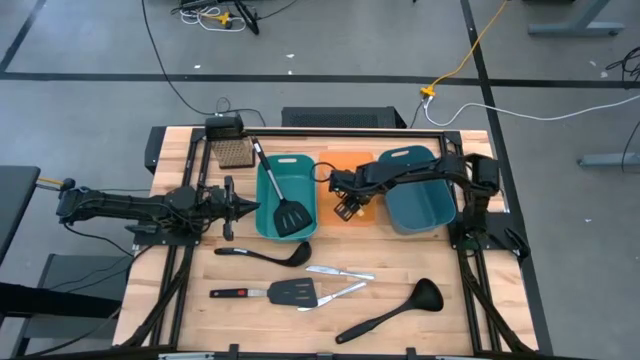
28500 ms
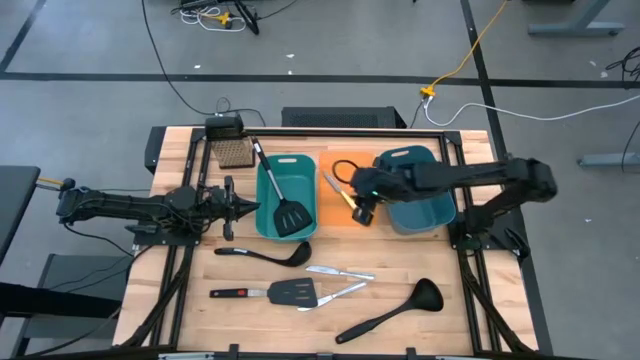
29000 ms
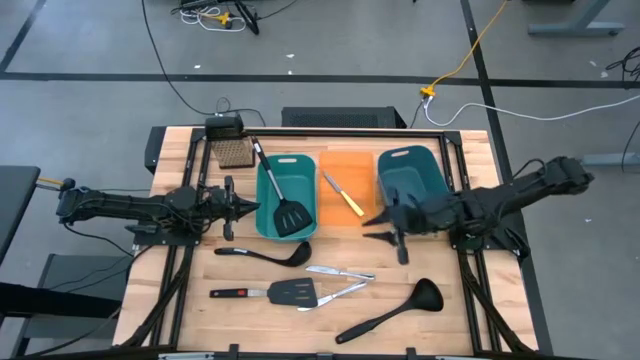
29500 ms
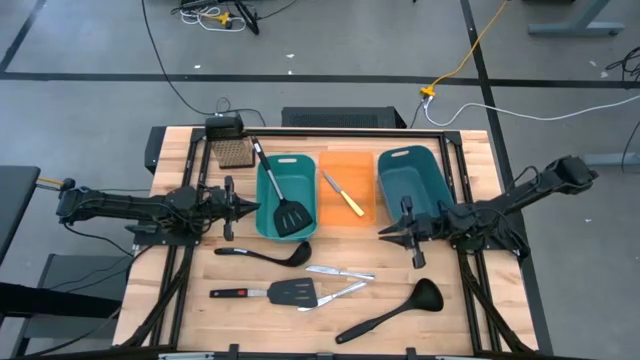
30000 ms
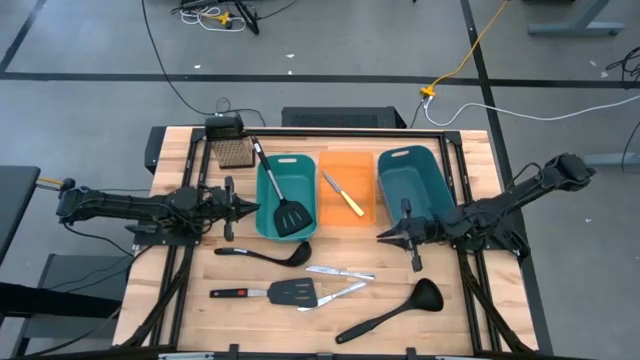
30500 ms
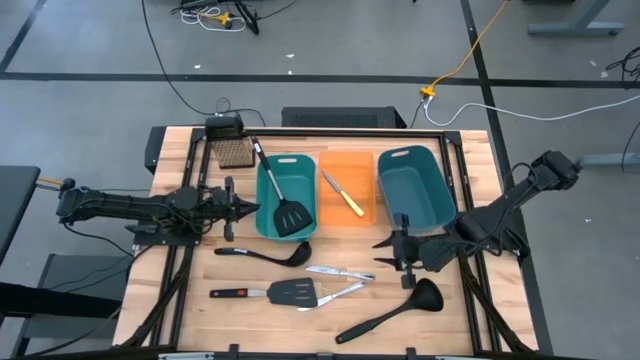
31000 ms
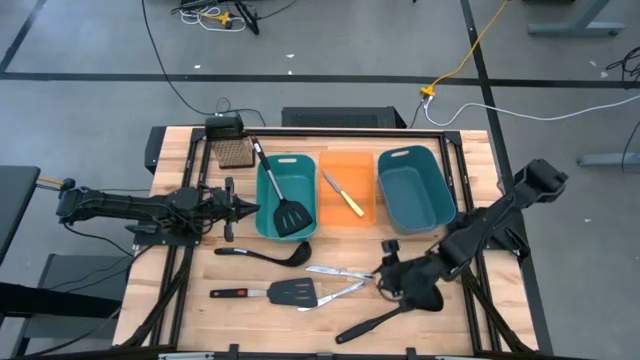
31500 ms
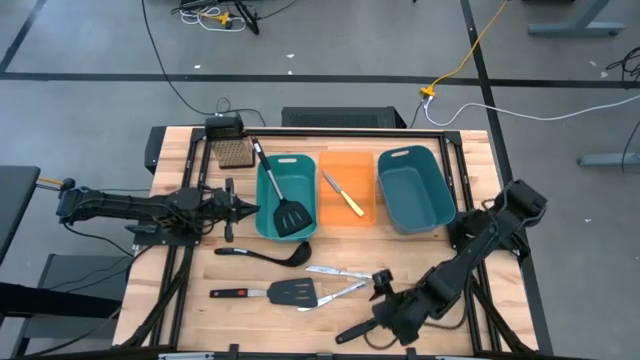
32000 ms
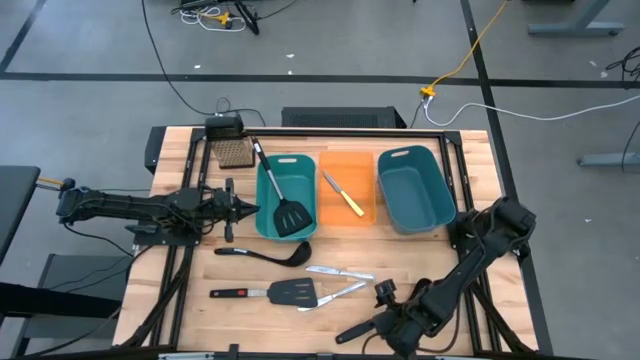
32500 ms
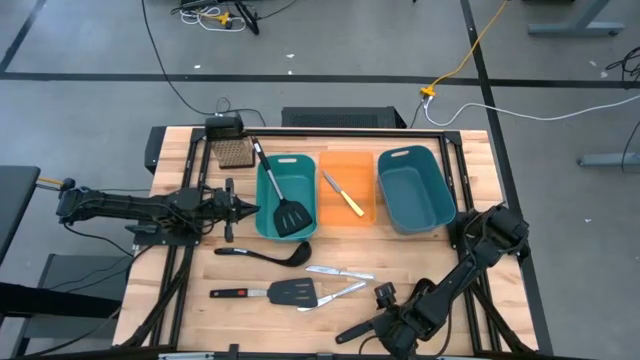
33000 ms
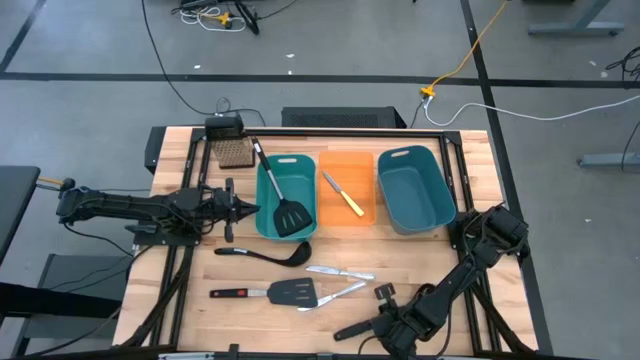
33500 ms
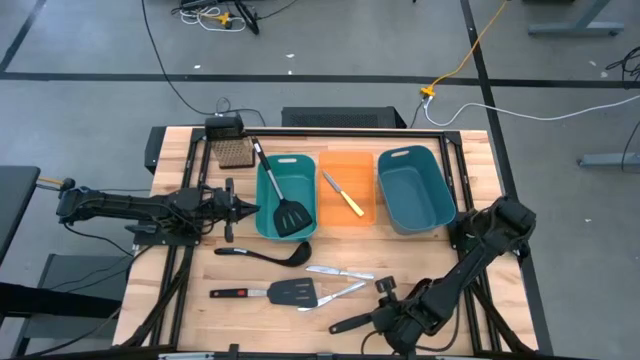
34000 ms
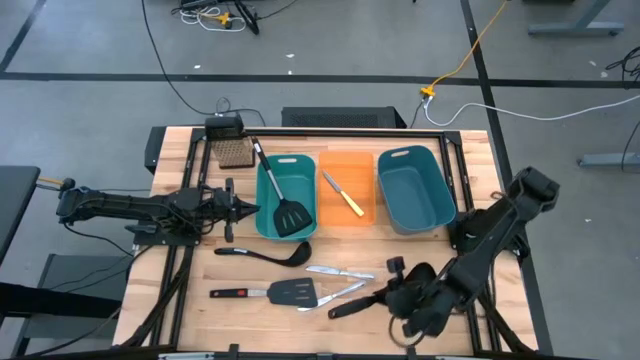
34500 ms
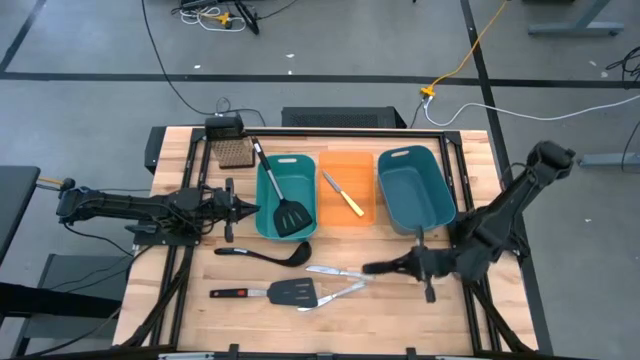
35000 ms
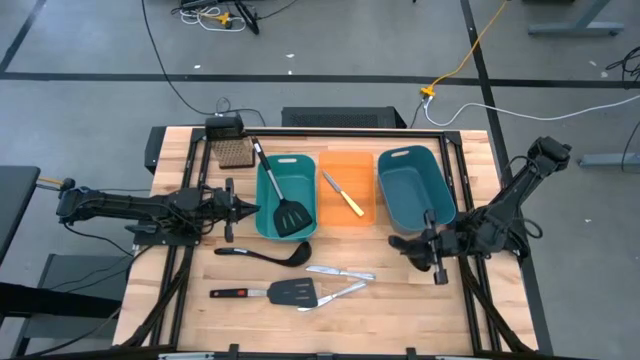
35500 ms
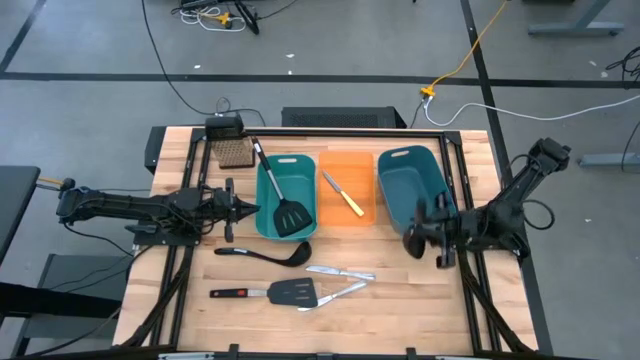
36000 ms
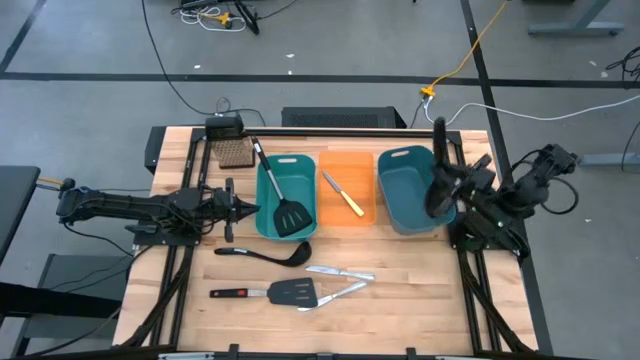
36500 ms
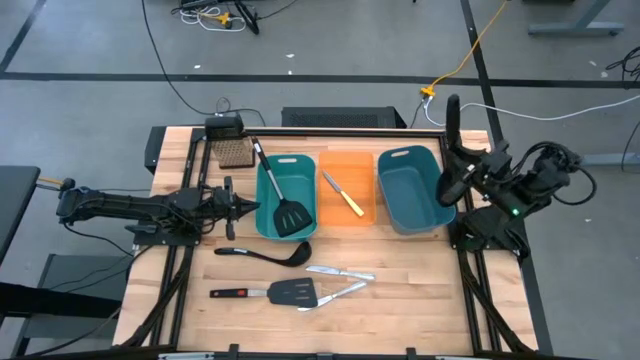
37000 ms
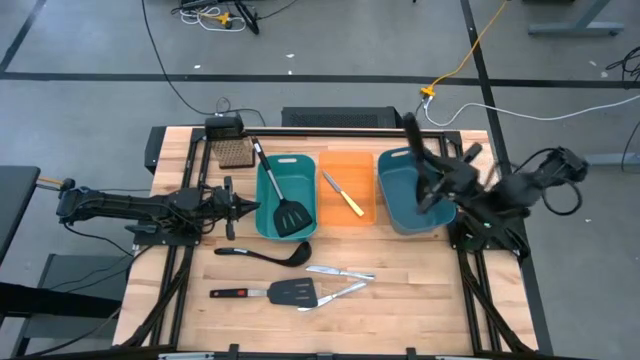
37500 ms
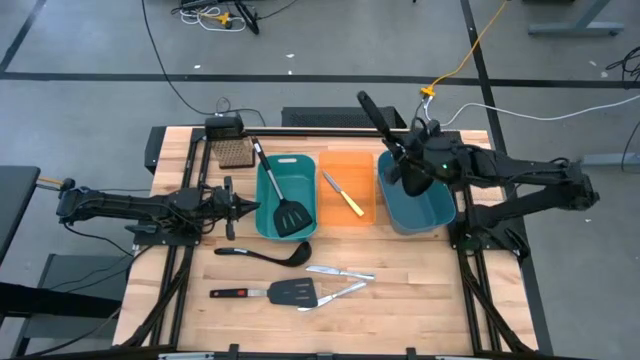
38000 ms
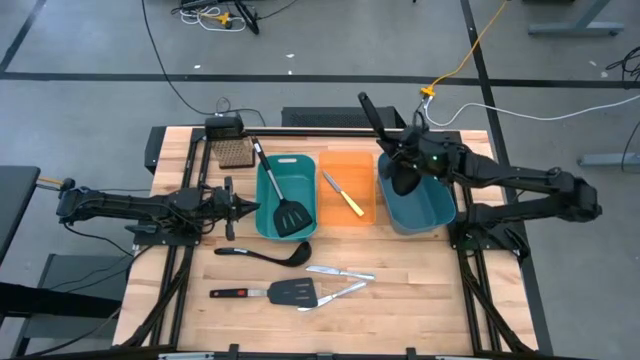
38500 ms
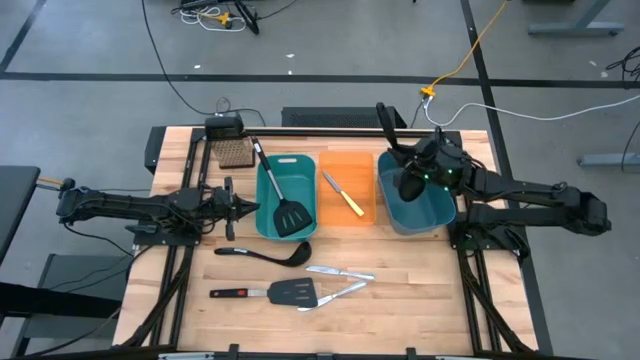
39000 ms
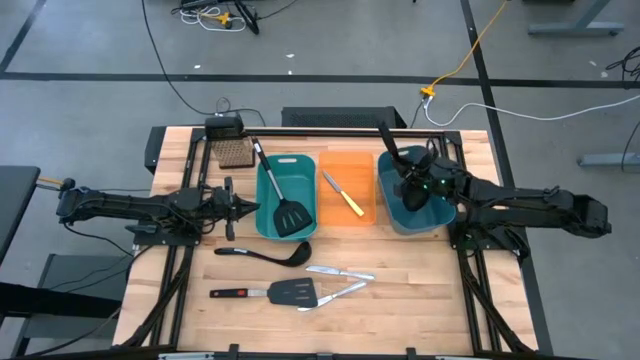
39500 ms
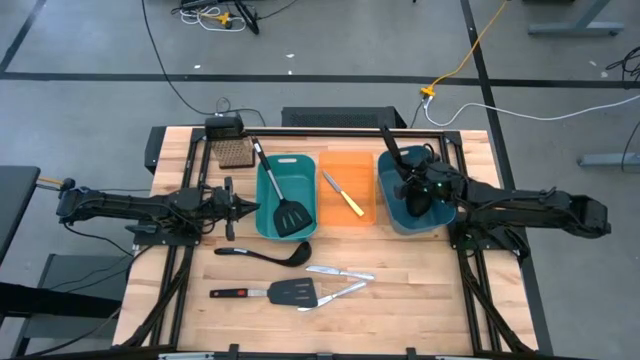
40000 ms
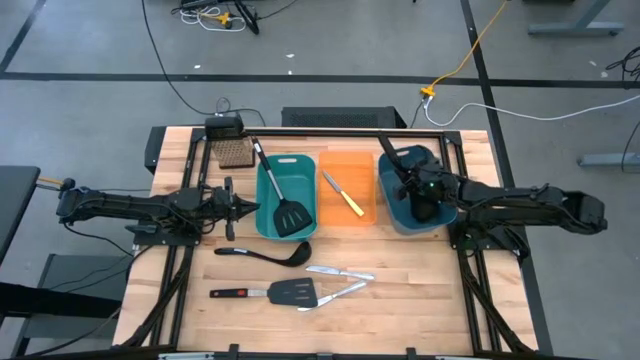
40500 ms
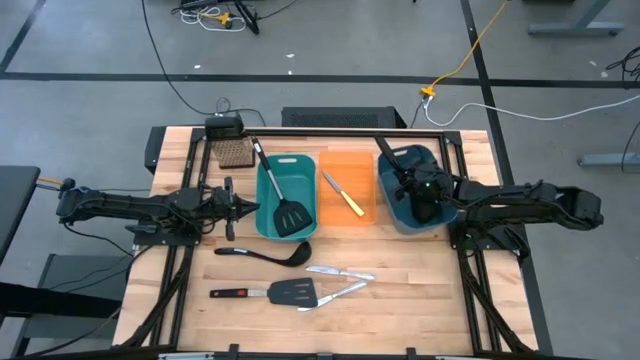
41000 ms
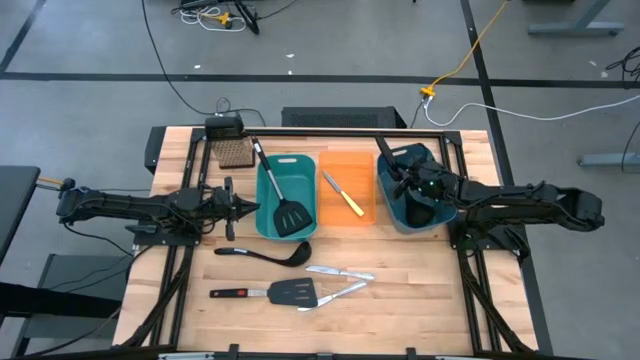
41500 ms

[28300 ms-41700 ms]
Task: Pick & Place Kitchen Items
Put the black serving spoon into the dark blue bin

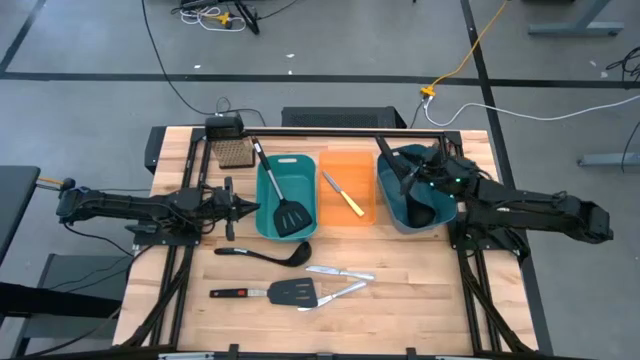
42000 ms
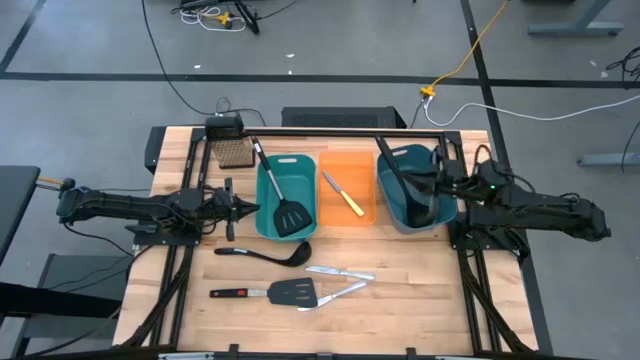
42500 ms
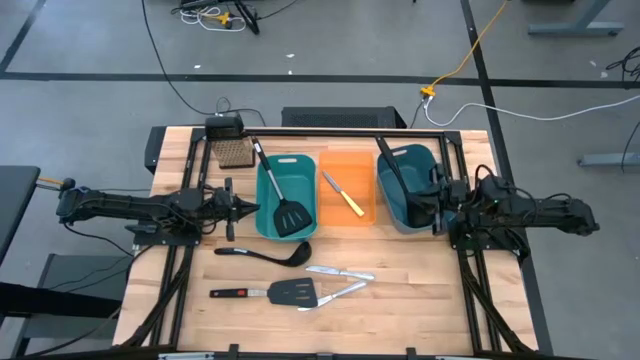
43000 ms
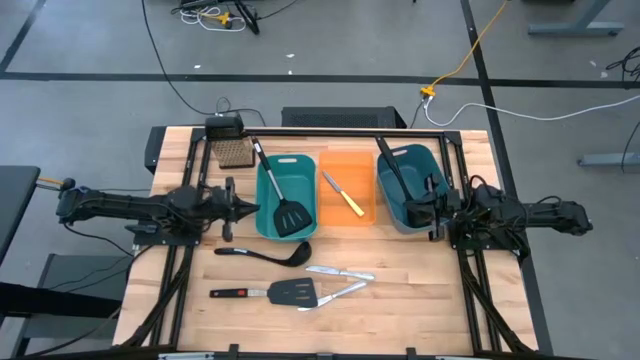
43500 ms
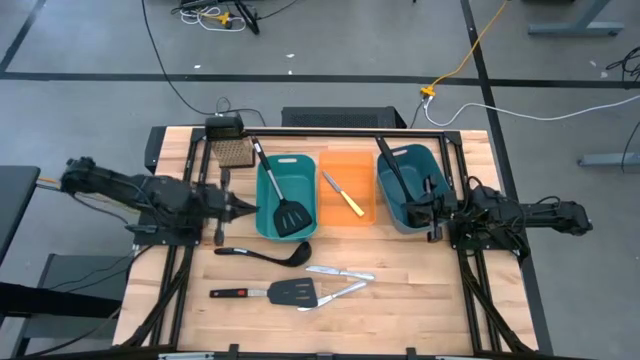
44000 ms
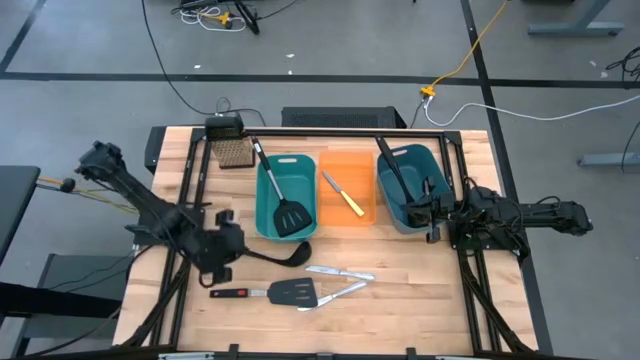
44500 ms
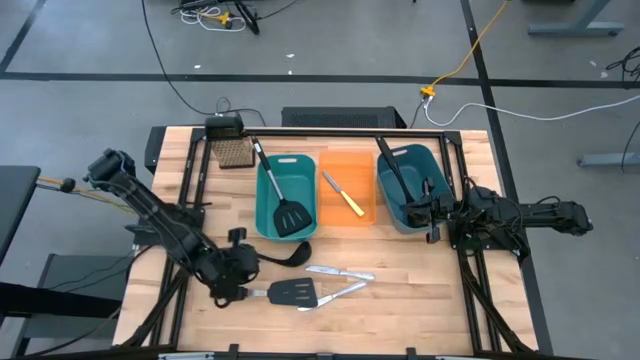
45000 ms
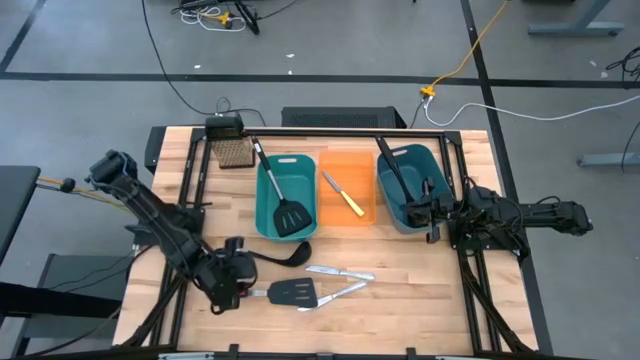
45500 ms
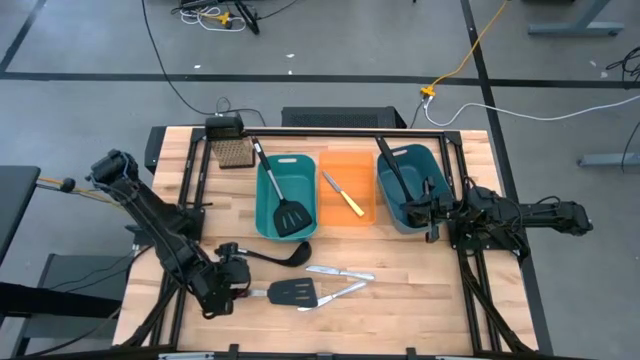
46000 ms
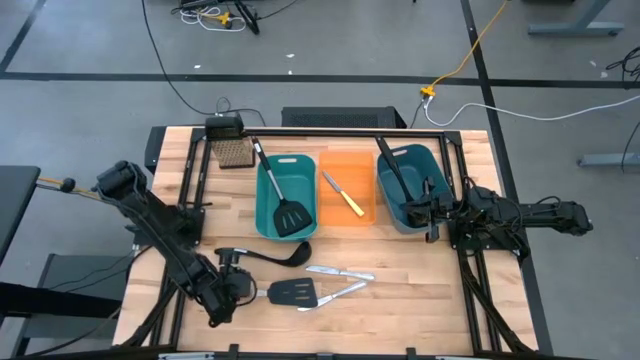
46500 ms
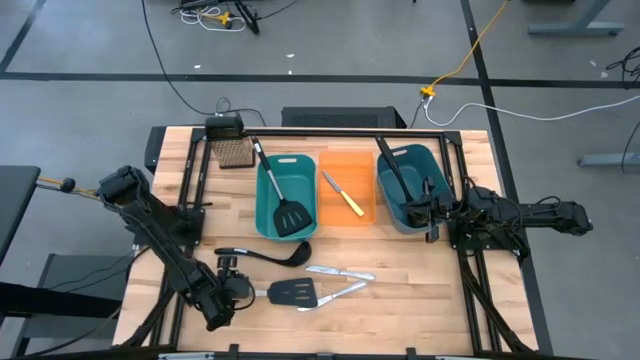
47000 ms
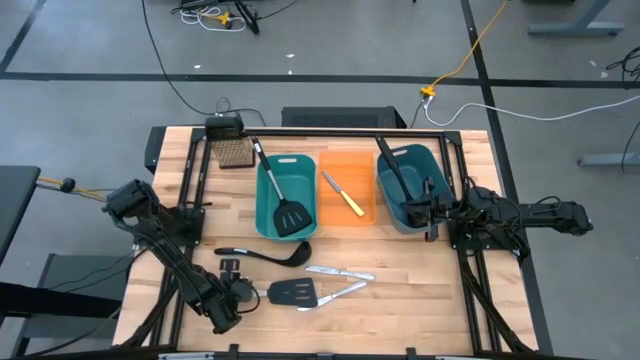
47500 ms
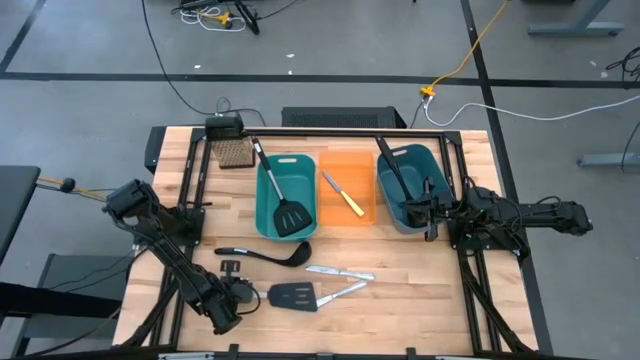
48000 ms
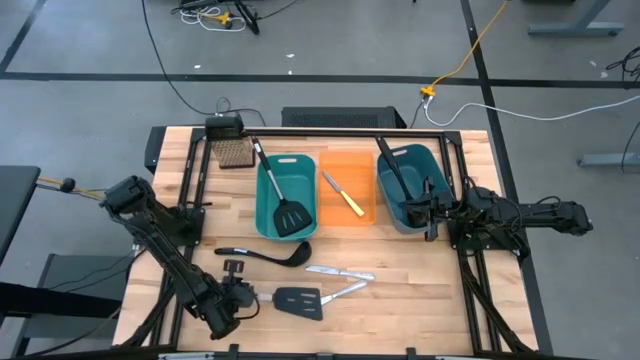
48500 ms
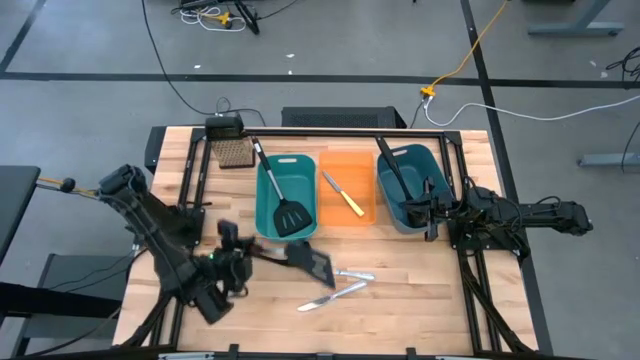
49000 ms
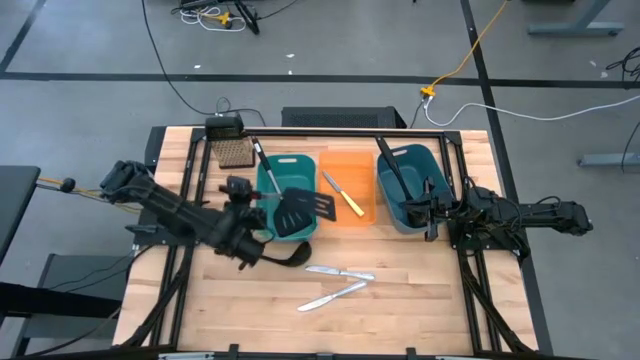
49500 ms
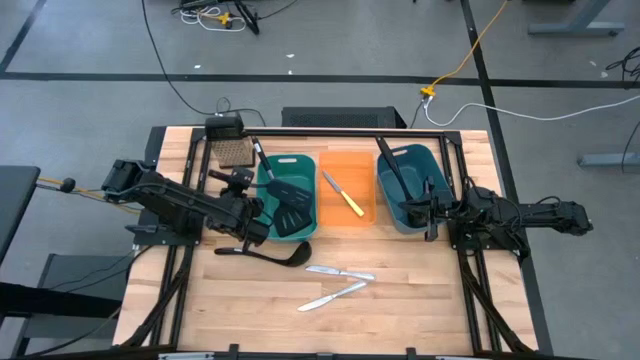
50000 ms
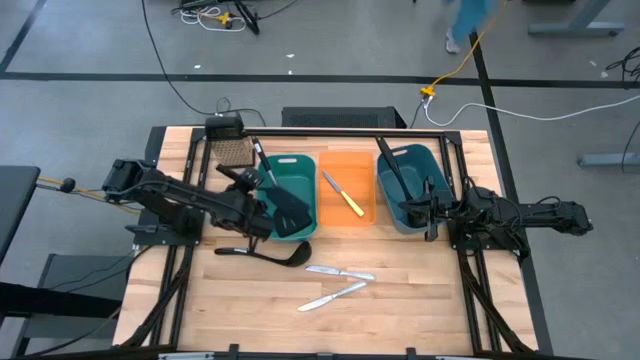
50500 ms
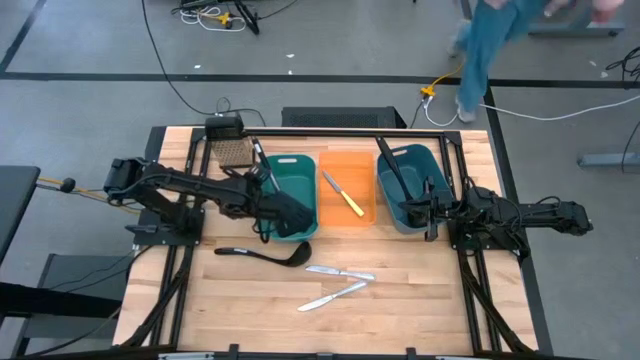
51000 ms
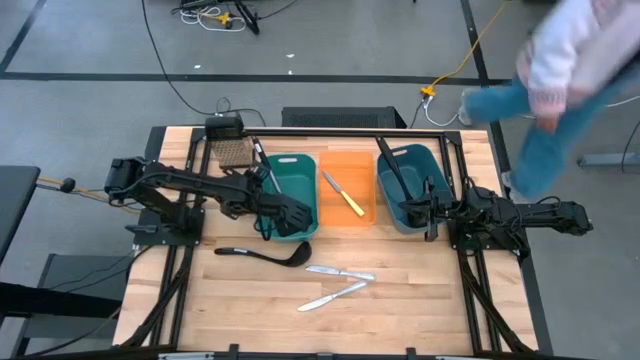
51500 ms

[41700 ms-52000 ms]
Put the black spatula into the dark green bin
